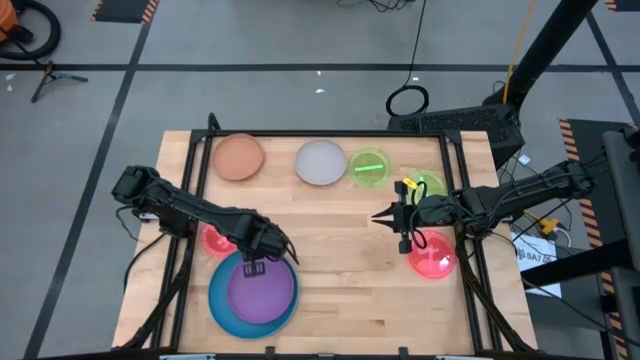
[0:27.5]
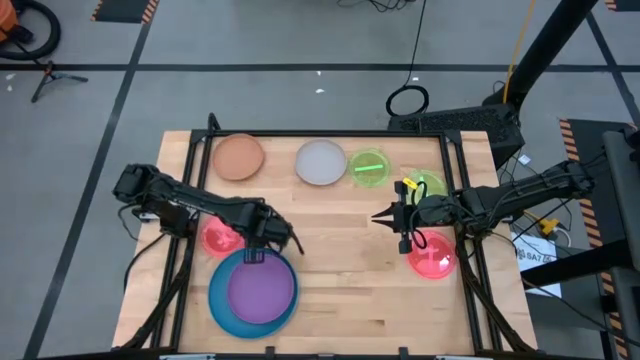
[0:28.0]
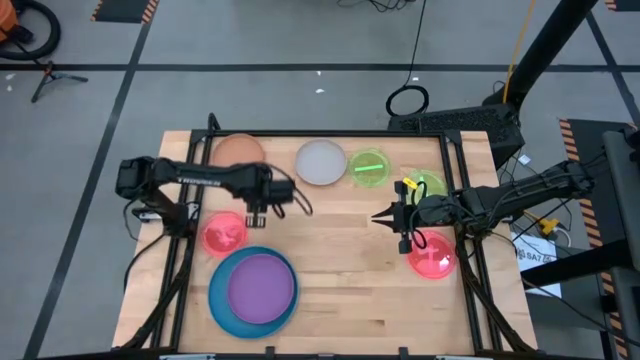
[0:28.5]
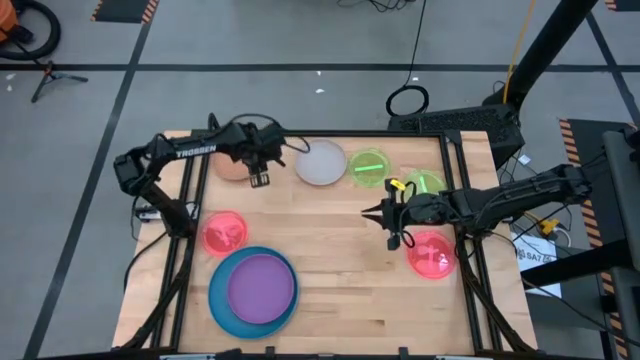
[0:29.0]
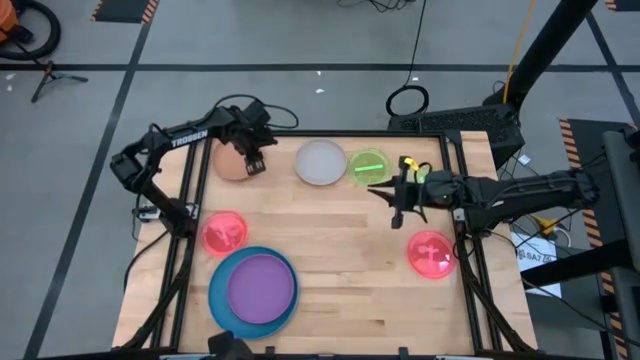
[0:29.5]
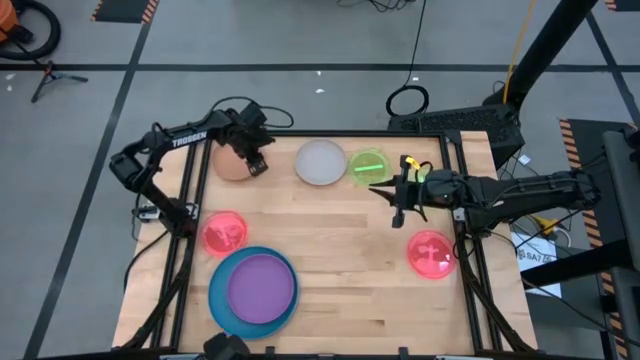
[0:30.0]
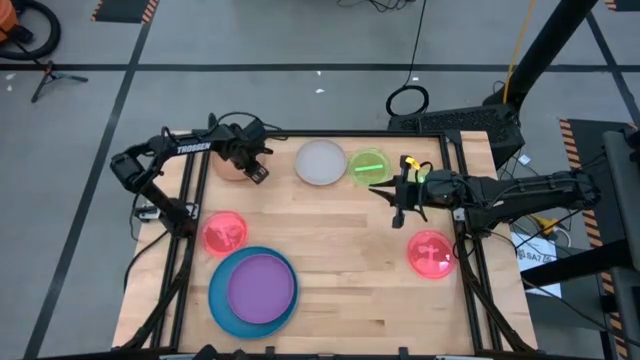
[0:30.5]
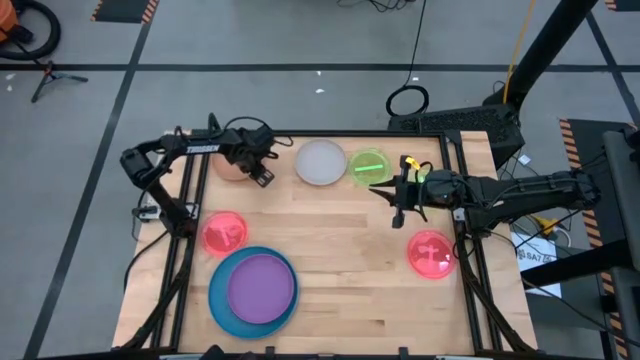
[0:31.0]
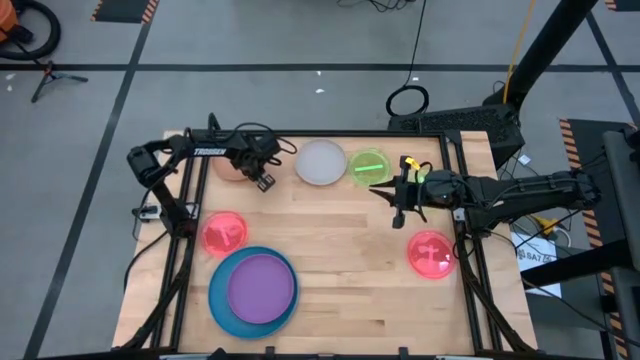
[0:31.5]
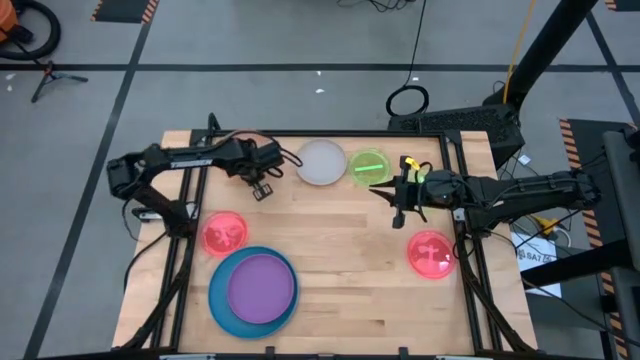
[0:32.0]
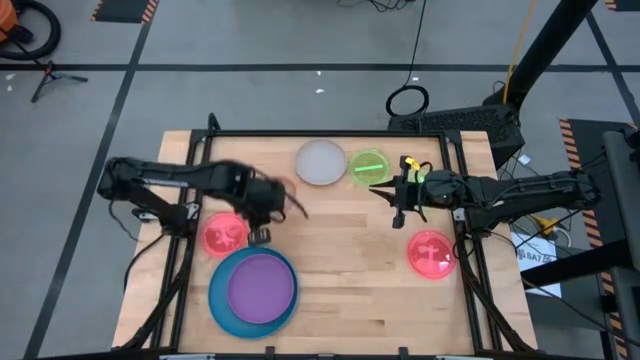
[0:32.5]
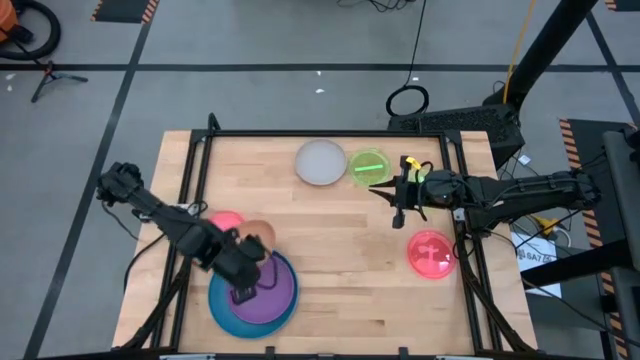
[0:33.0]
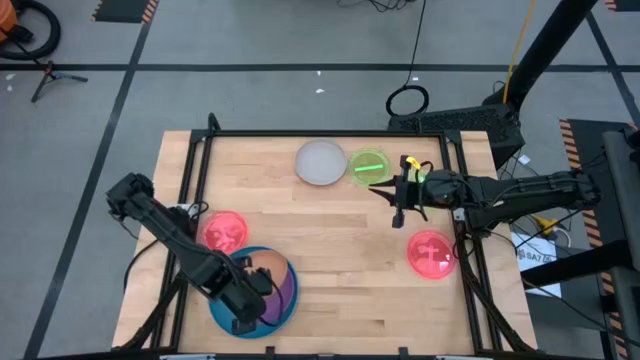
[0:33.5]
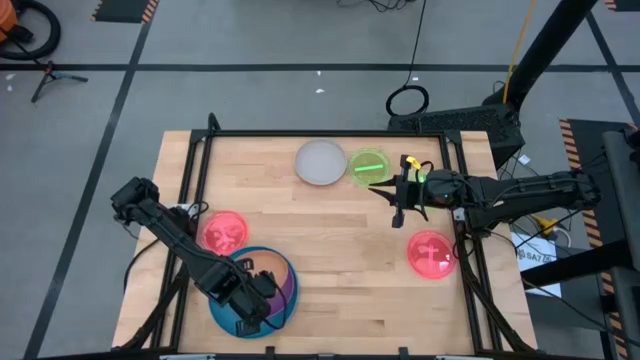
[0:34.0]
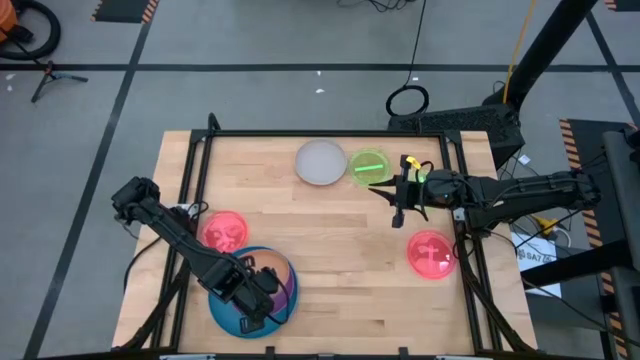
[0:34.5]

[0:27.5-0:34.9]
Task: Stack plastic plates
Stack the brown plate on the purple plate

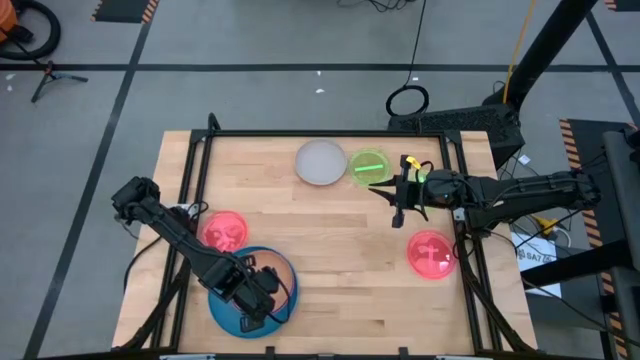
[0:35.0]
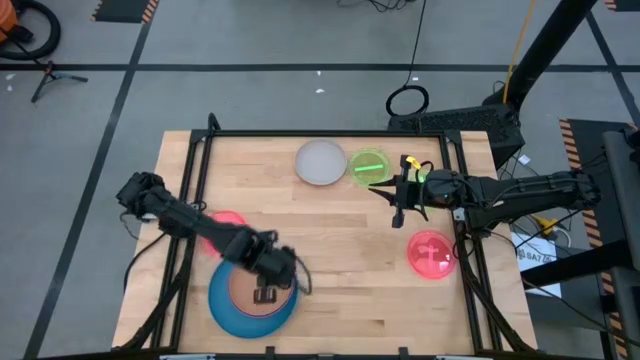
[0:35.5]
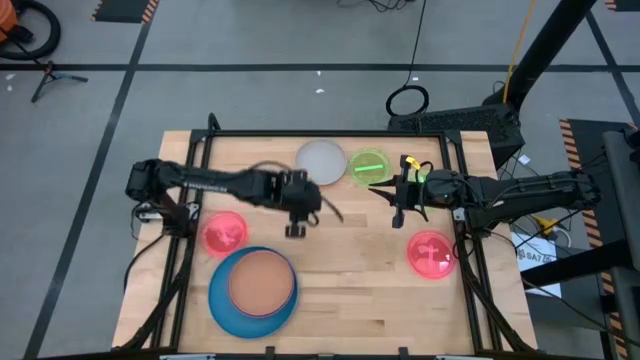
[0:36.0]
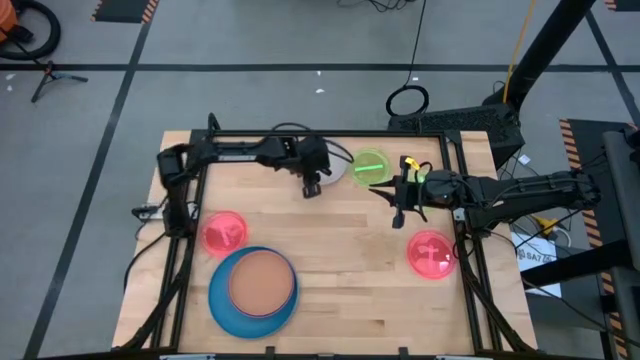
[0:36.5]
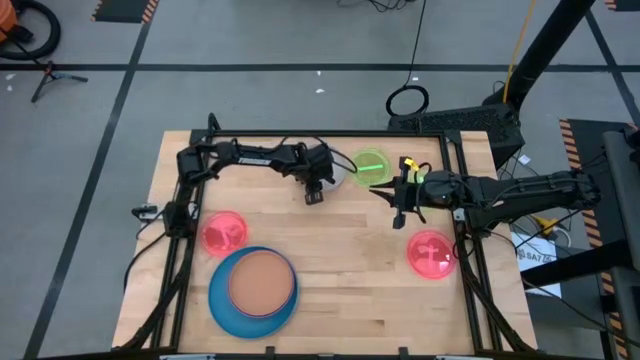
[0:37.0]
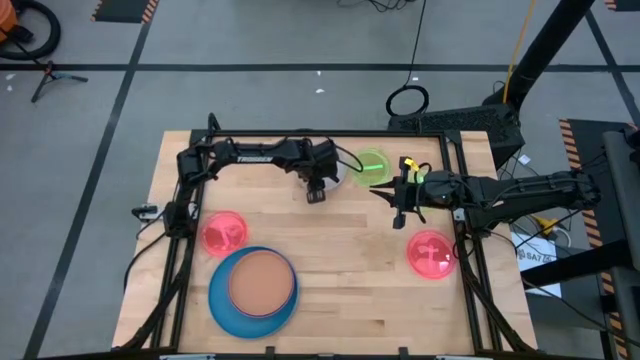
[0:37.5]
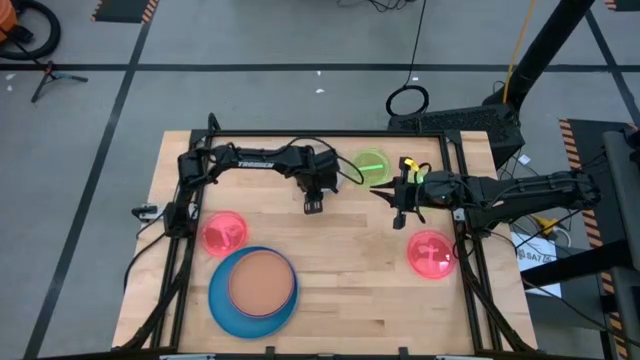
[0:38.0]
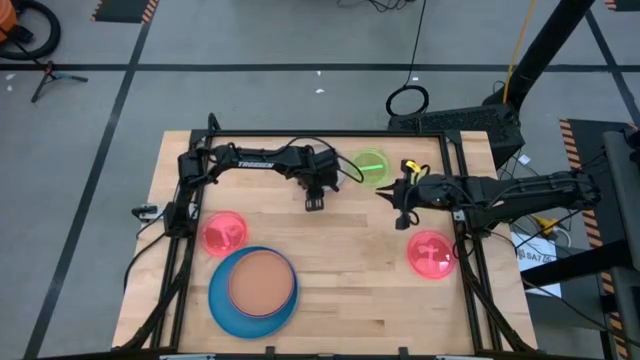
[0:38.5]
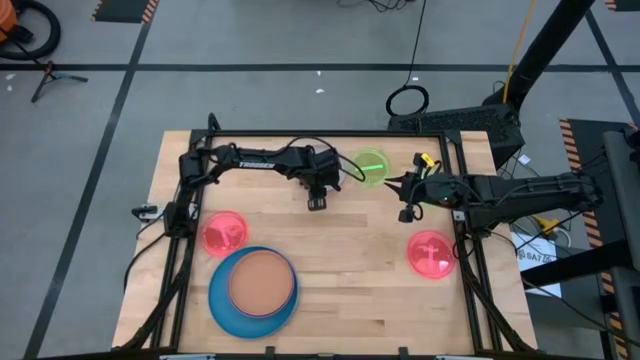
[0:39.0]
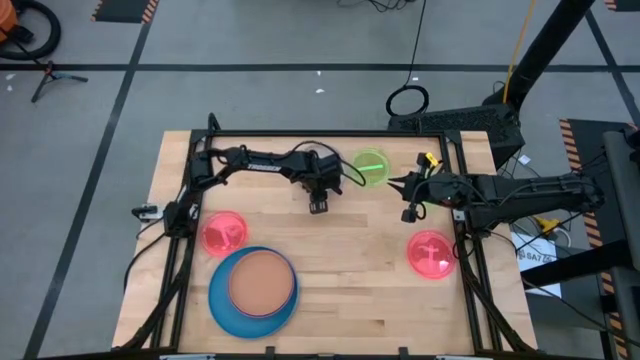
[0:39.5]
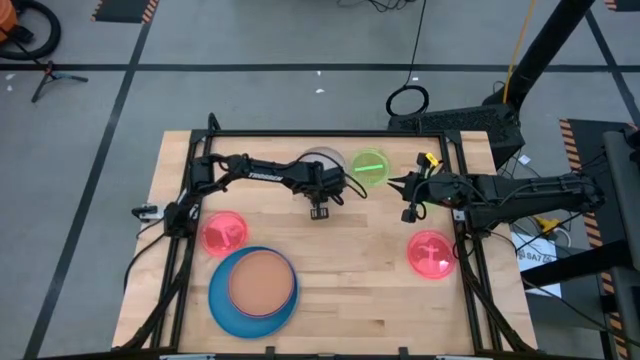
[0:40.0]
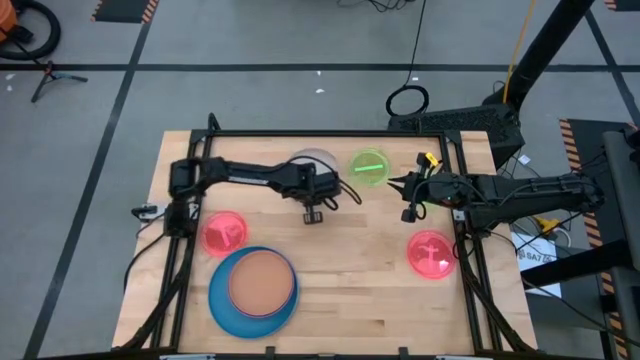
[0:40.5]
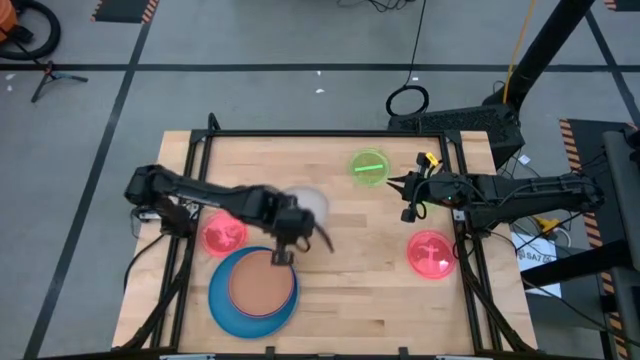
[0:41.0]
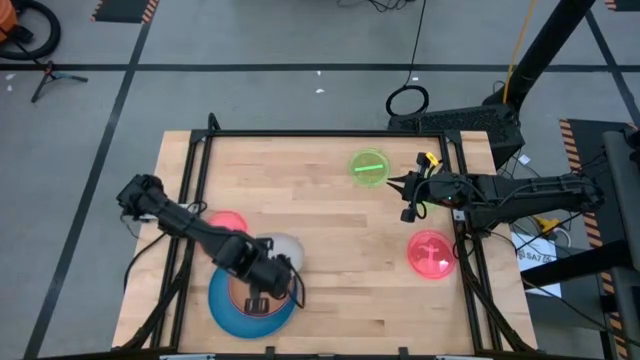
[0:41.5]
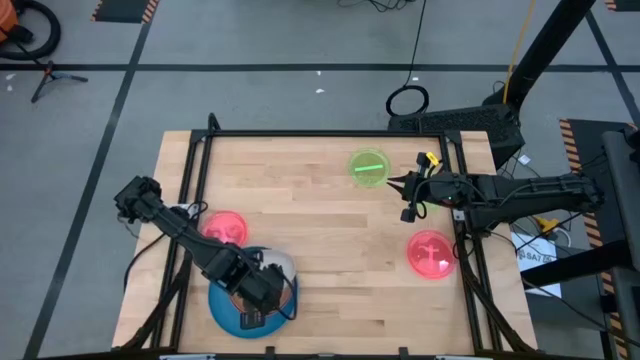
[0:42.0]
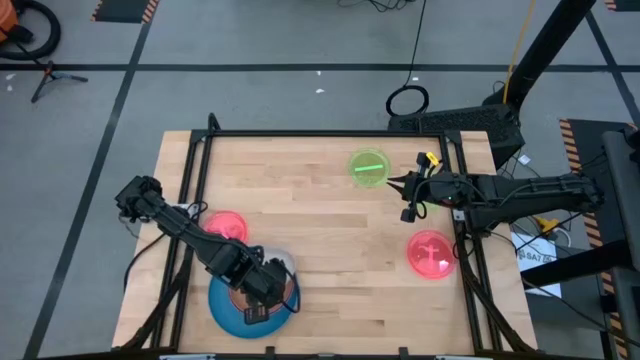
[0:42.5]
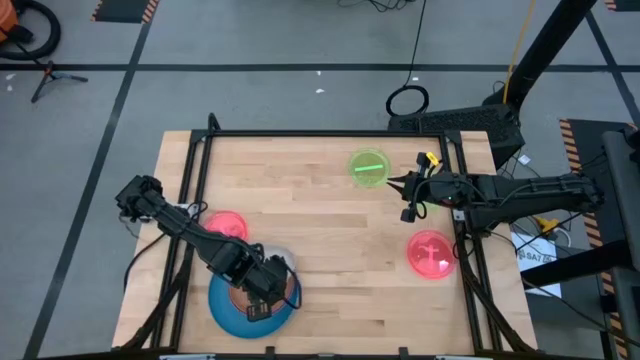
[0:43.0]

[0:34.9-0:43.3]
Stack the gray plate on the brown plate

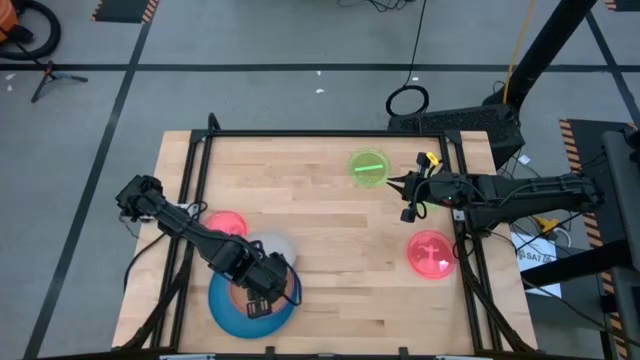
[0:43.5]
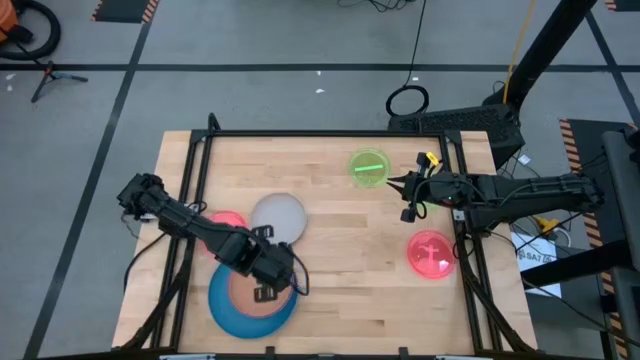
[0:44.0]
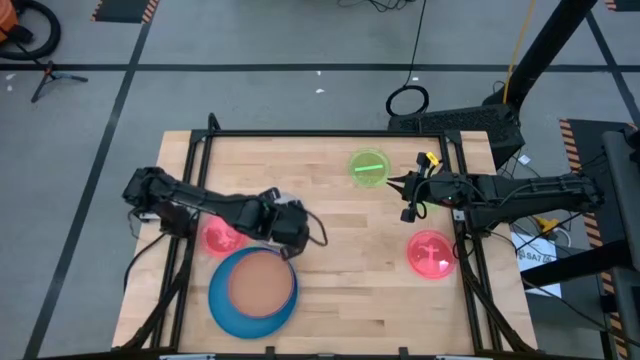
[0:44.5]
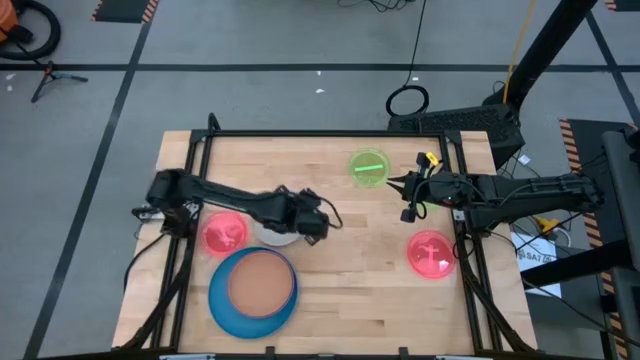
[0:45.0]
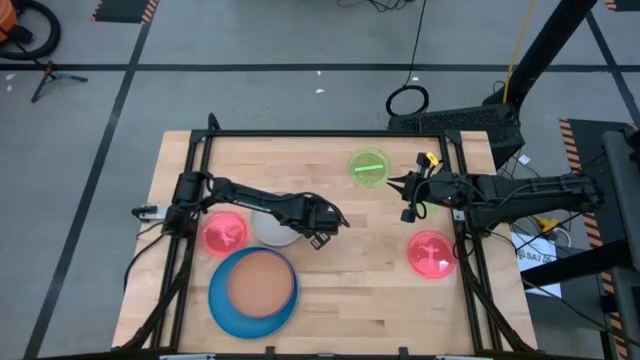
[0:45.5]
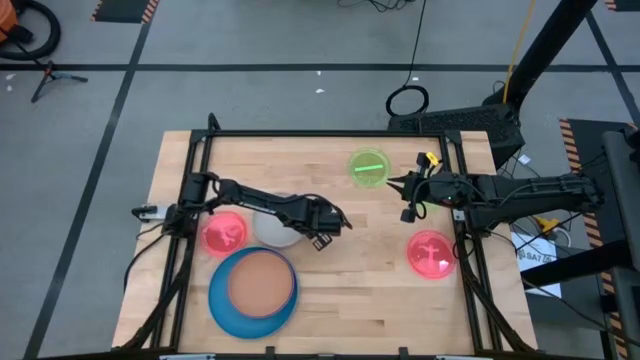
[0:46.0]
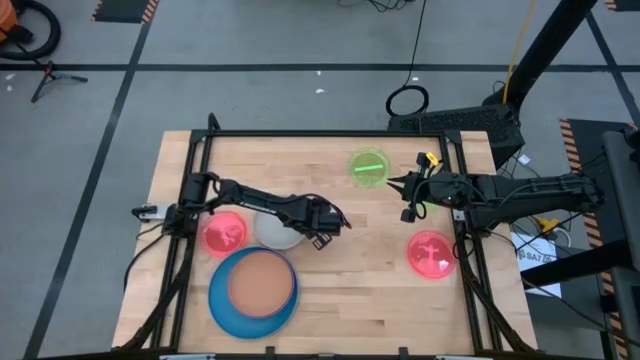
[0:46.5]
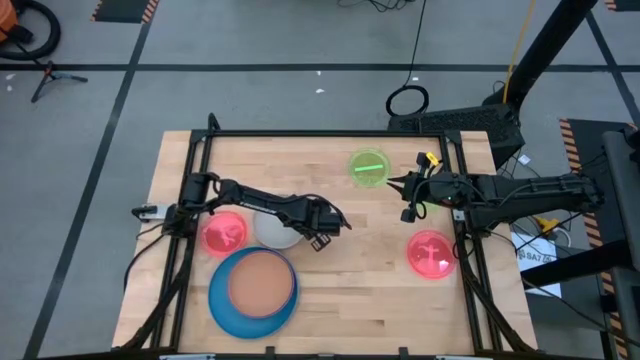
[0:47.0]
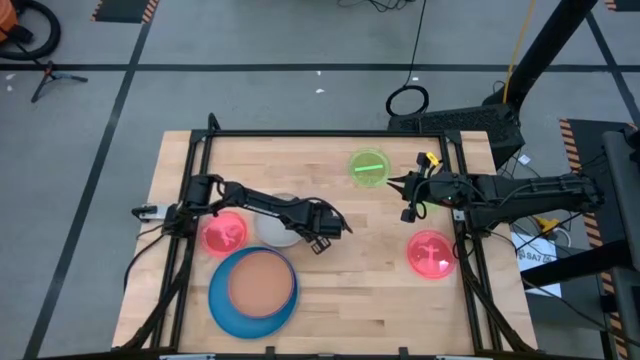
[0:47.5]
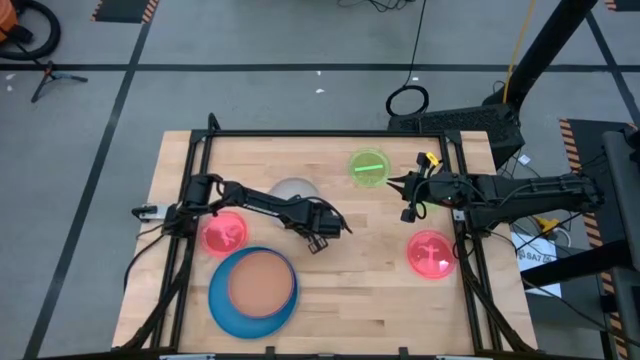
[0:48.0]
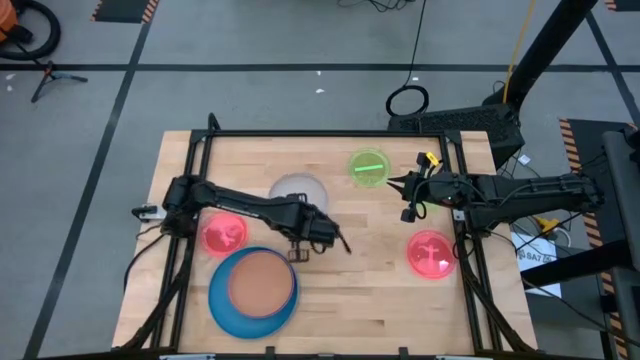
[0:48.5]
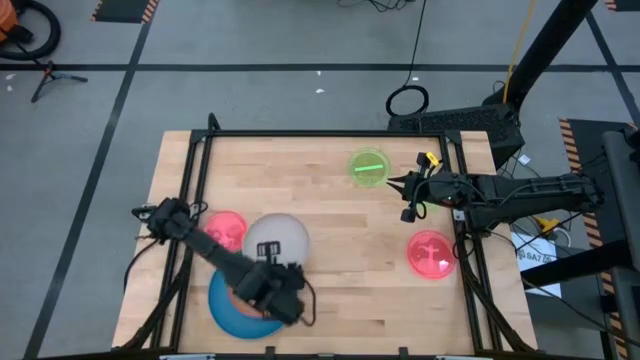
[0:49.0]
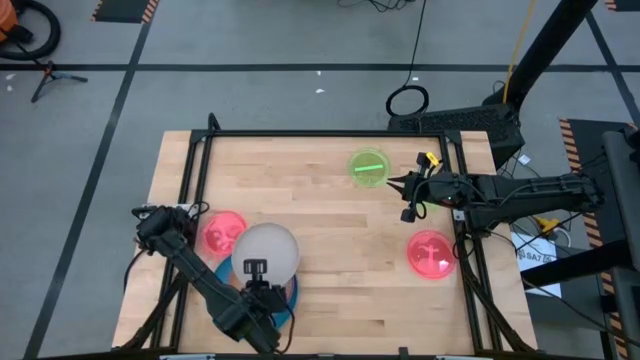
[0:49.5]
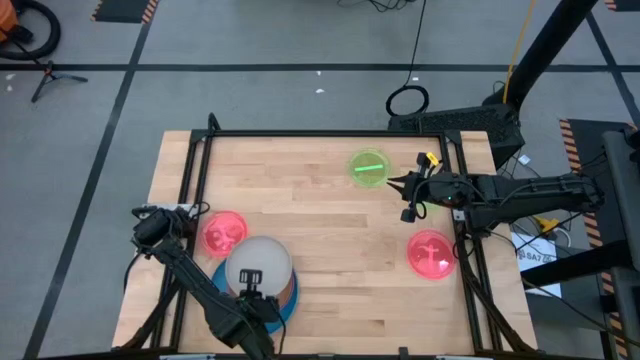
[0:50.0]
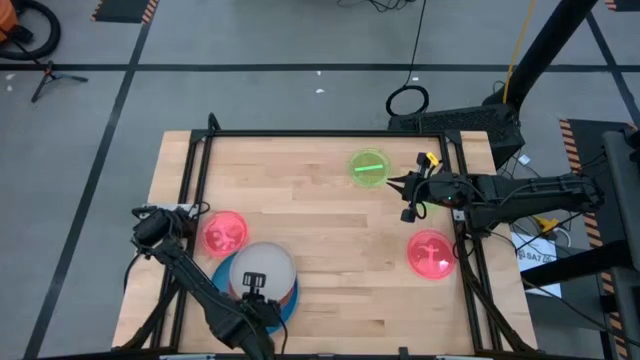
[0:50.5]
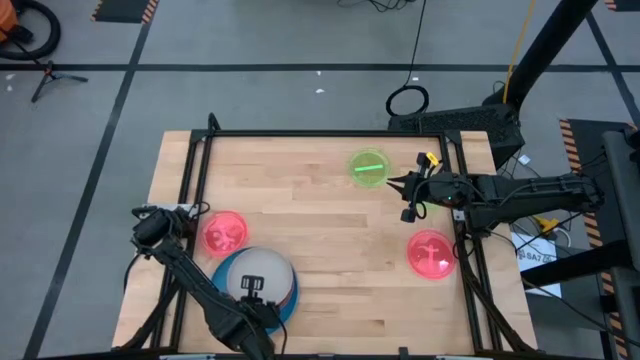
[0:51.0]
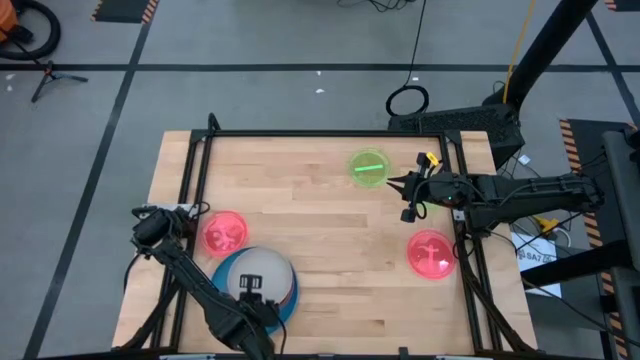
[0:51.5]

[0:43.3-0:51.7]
Stack the gray plate on the brown plate
